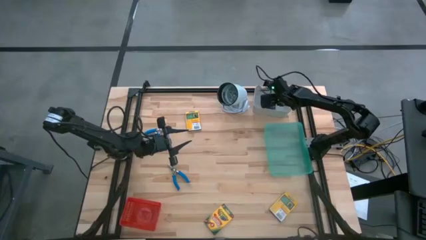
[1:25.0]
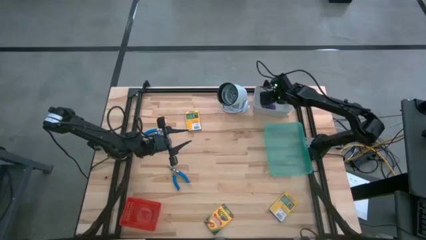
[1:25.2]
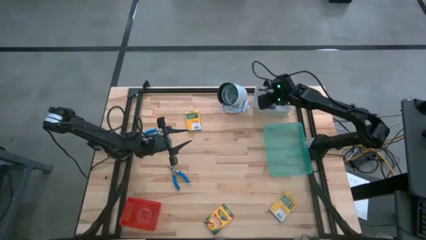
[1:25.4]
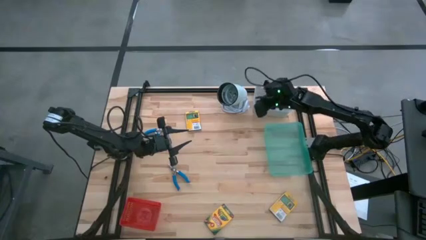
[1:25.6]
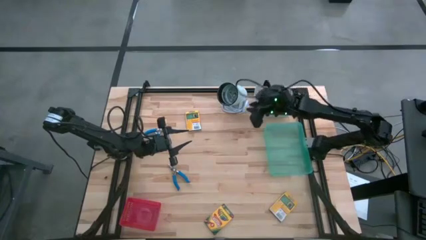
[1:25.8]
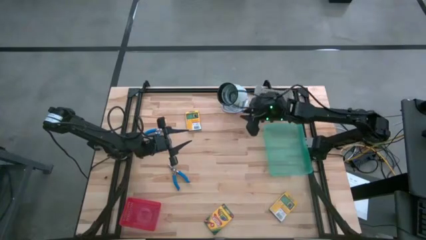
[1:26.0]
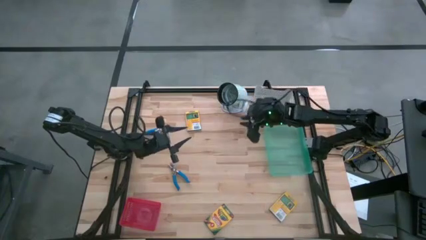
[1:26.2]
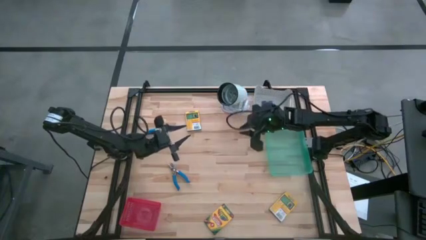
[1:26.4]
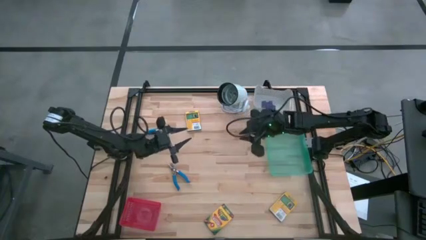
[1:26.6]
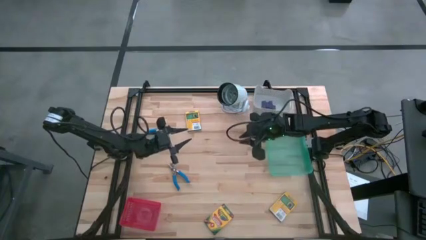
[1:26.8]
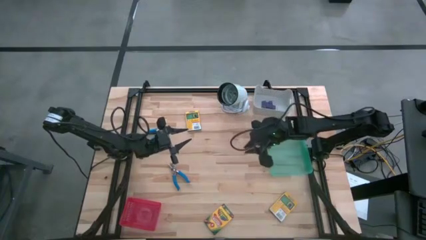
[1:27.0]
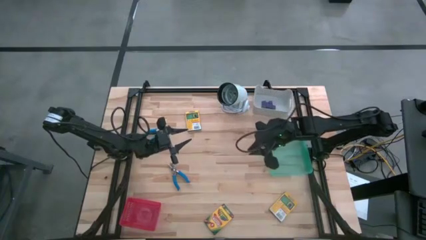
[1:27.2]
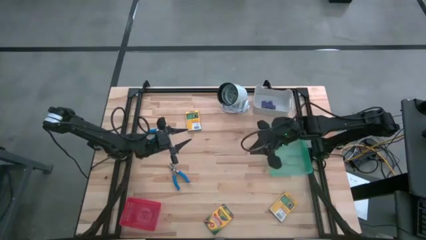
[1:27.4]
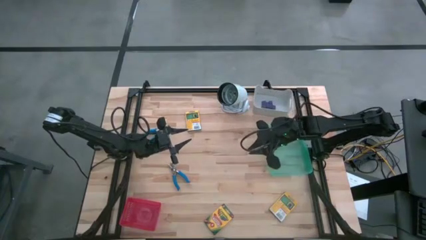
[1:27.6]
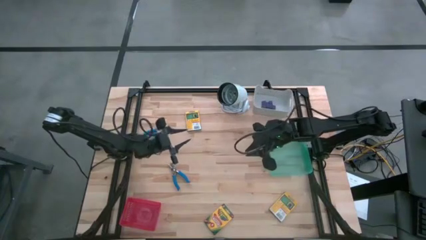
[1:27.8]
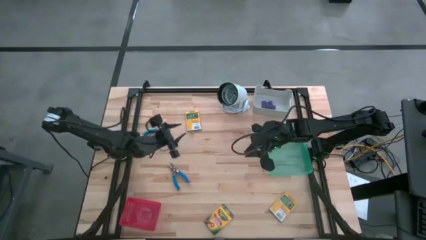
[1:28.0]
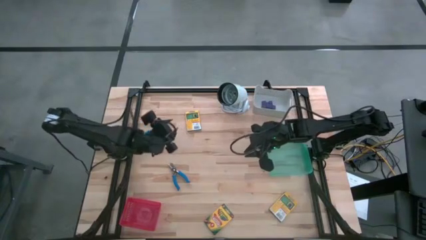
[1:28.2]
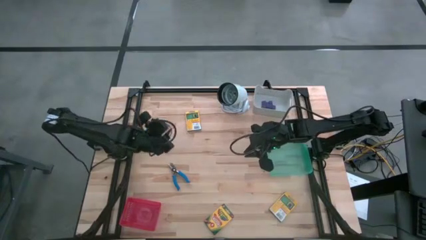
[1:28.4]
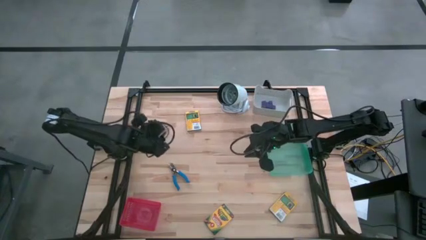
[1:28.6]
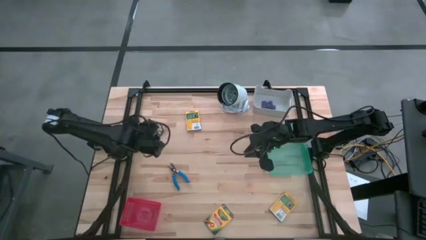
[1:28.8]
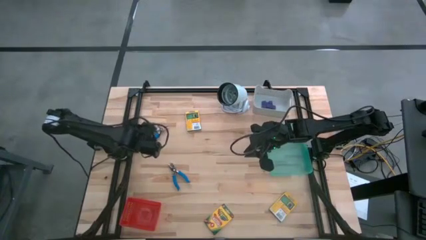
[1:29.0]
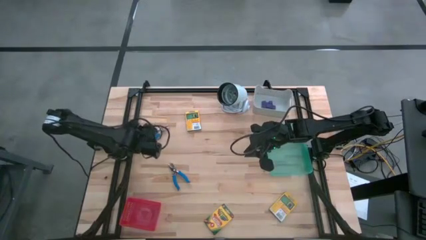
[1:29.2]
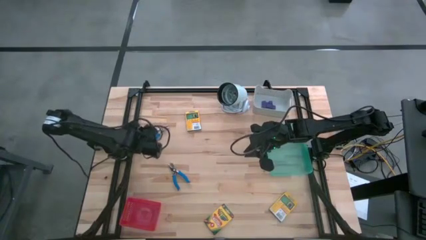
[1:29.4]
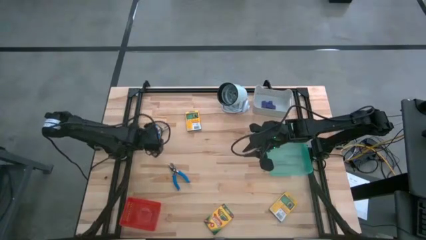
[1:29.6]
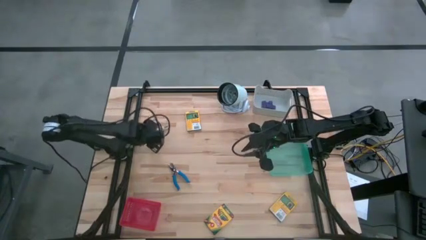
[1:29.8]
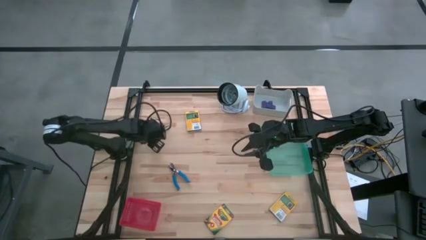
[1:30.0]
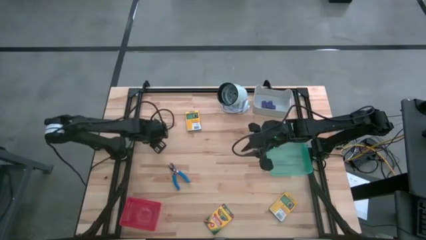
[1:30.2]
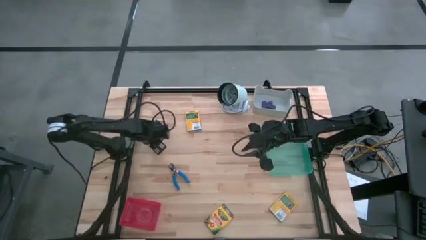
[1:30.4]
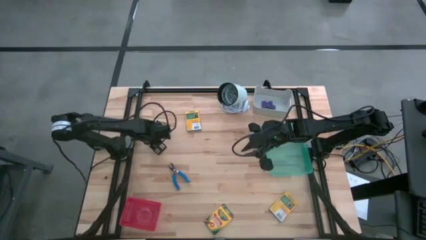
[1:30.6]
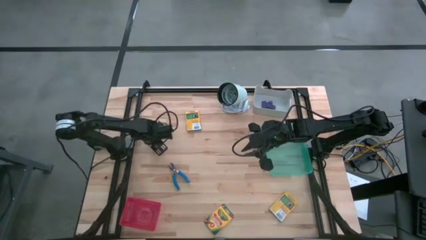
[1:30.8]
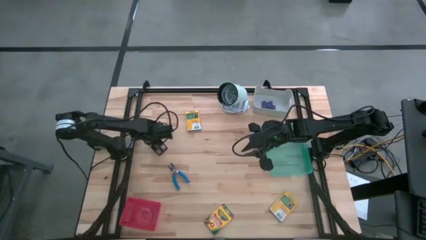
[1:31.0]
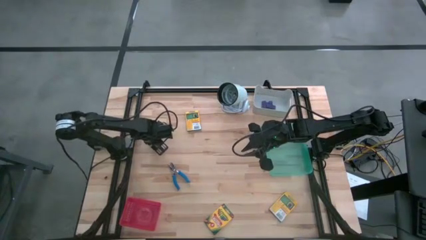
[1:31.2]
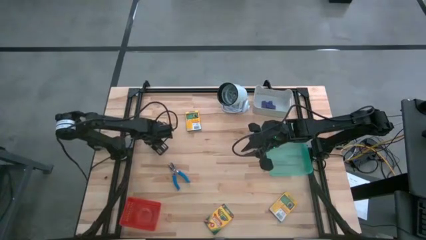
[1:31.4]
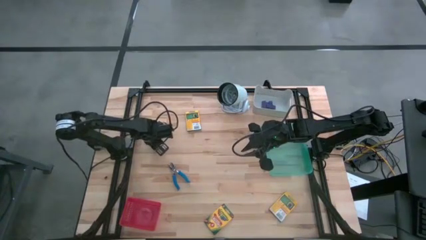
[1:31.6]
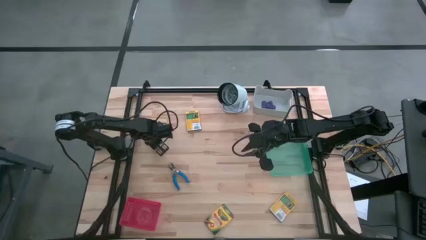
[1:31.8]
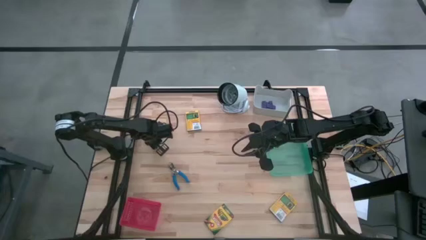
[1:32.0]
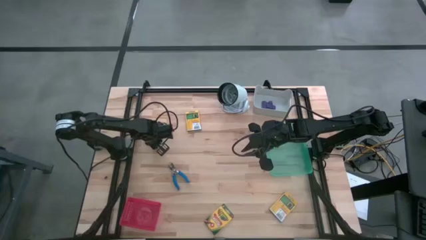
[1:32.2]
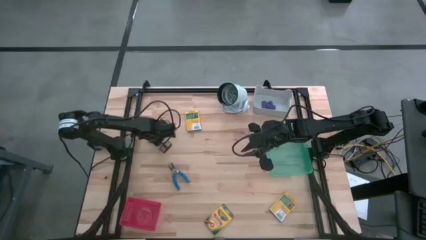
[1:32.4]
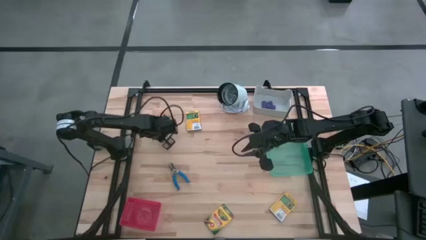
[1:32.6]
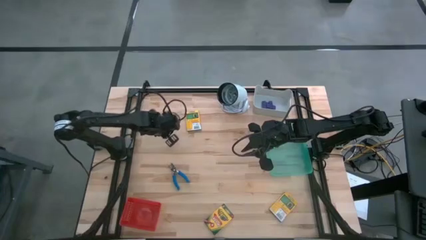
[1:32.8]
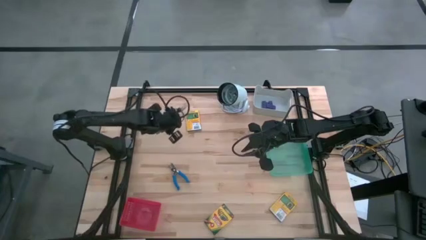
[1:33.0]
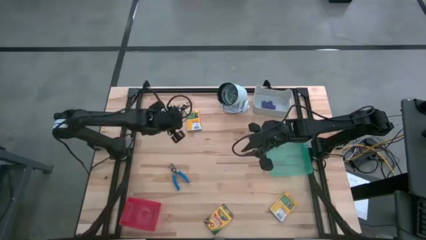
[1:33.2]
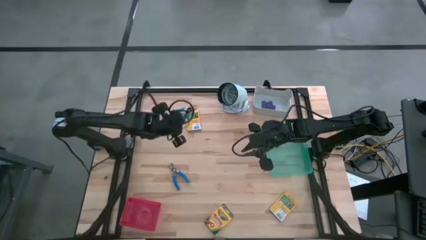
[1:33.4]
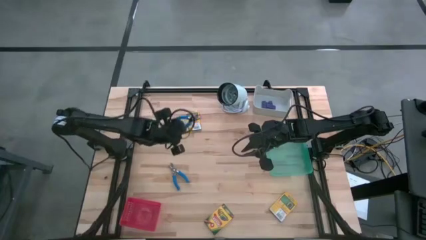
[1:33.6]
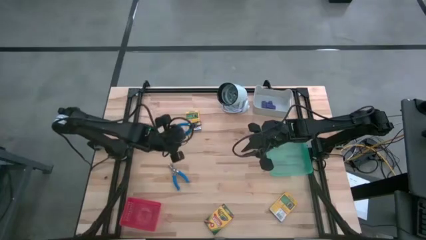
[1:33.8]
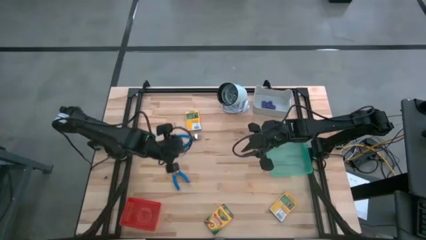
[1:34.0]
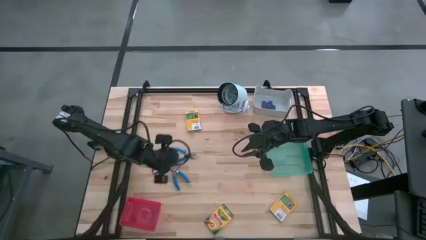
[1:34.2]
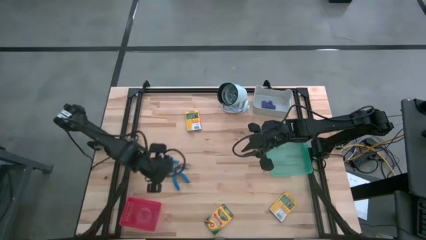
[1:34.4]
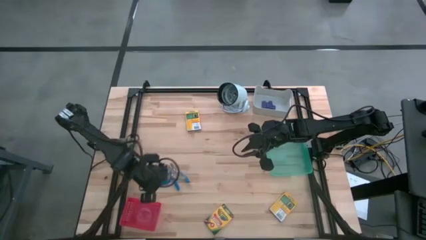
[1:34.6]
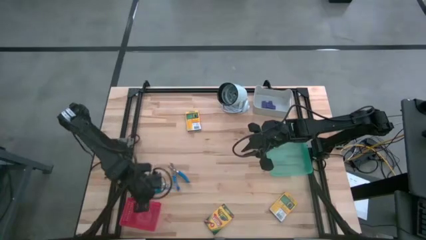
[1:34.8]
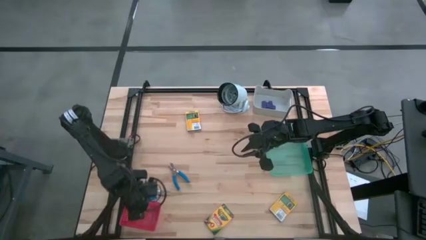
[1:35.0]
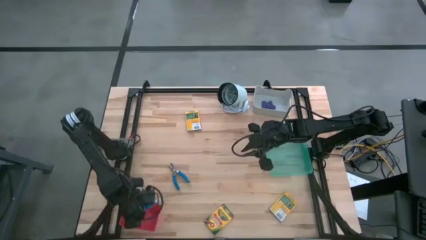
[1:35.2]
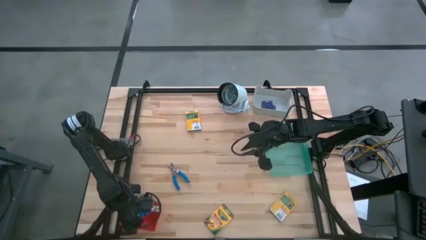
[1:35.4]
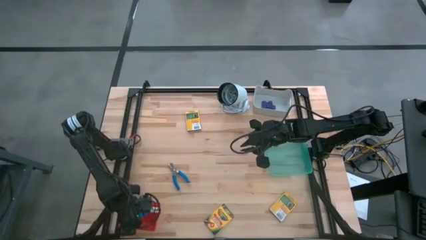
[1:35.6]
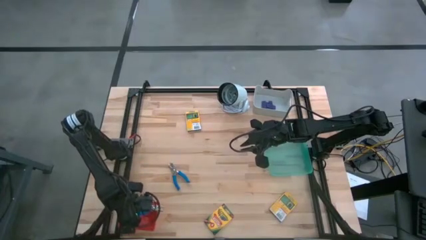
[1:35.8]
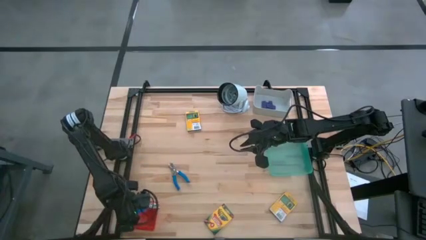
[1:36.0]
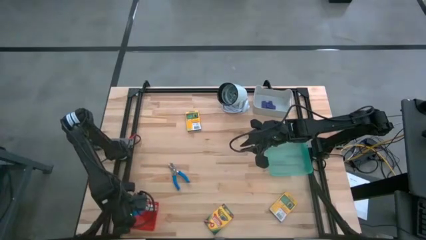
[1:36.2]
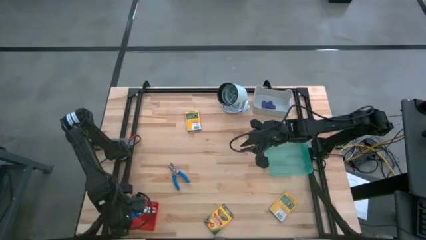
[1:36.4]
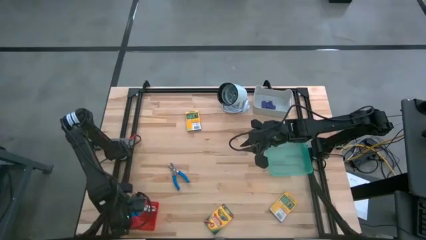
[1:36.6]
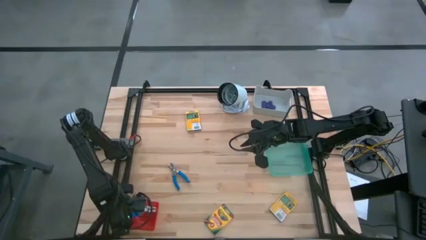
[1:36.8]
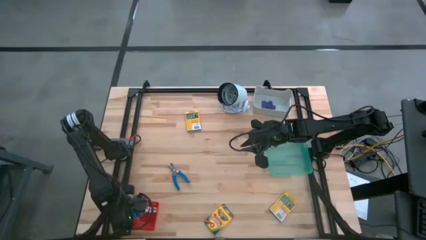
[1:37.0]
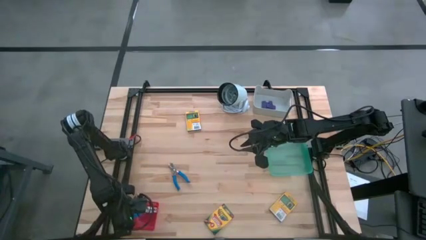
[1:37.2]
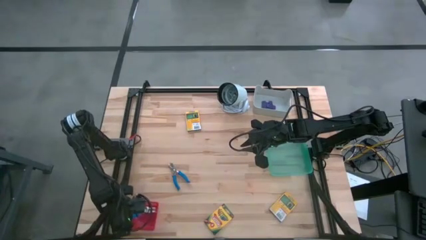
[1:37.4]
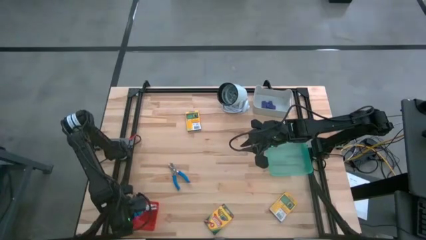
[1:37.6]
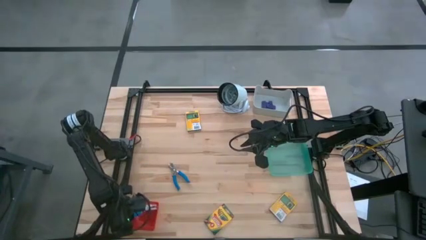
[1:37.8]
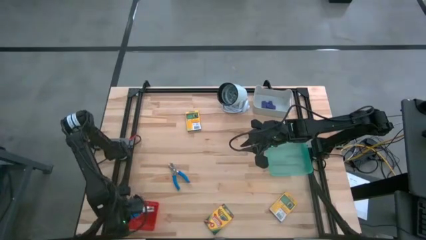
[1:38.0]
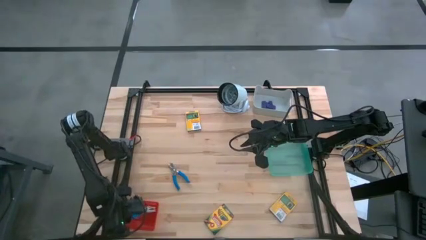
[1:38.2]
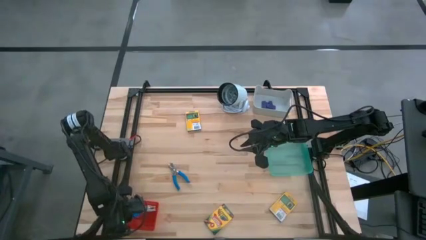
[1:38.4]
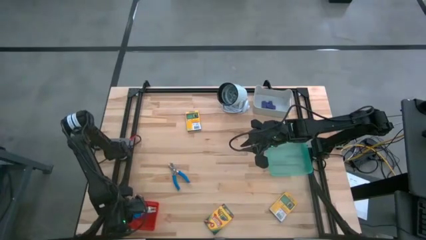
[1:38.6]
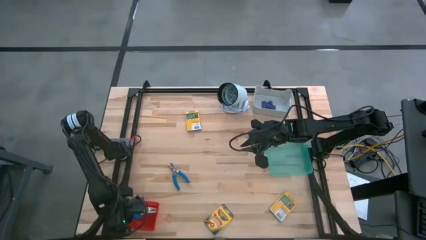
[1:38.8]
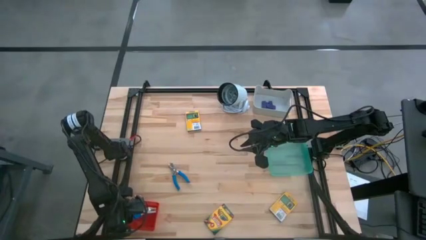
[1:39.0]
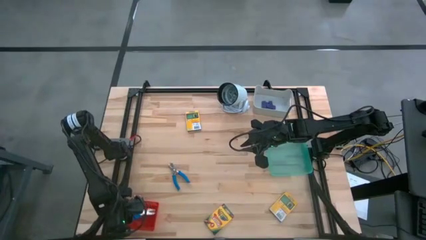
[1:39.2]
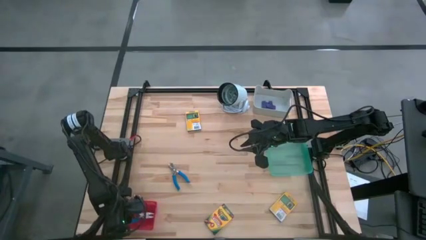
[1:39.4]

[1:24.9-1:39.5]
Task: Pick & Place School Supplies
Put the blue puncher into the red bin
